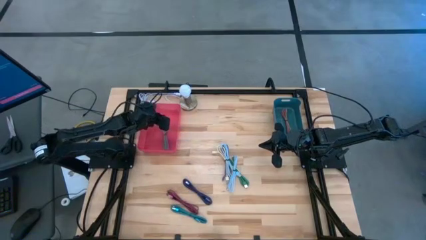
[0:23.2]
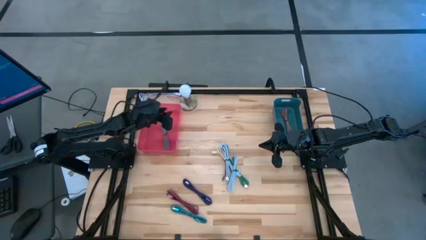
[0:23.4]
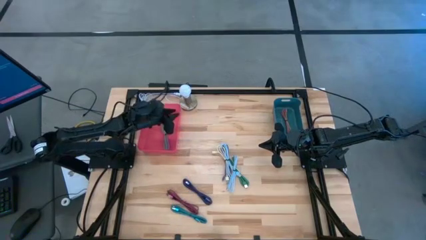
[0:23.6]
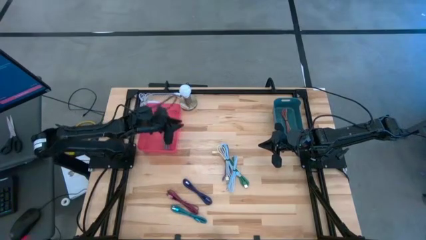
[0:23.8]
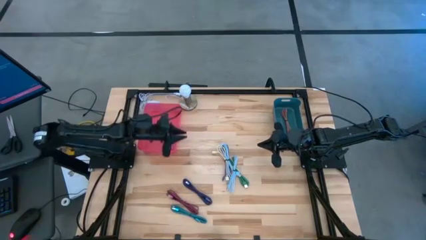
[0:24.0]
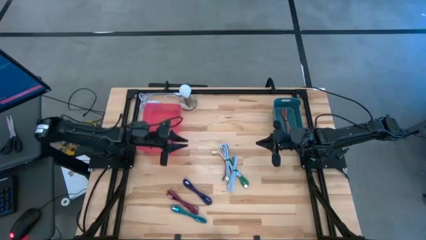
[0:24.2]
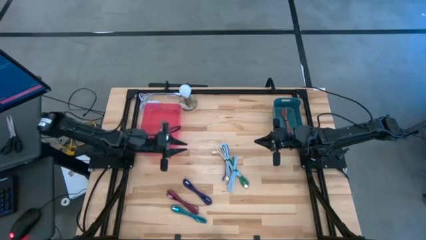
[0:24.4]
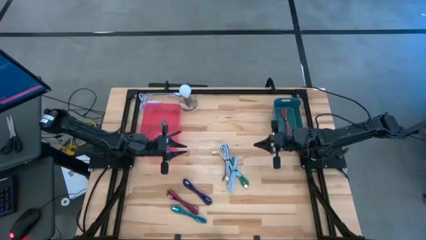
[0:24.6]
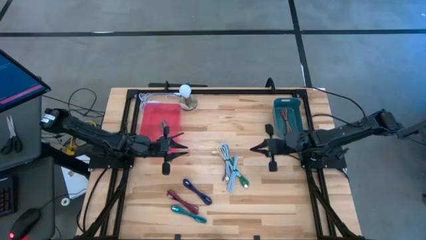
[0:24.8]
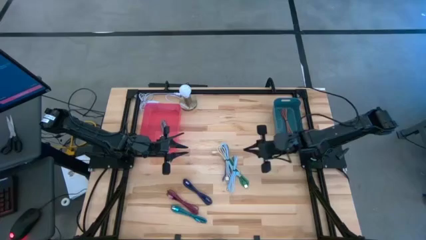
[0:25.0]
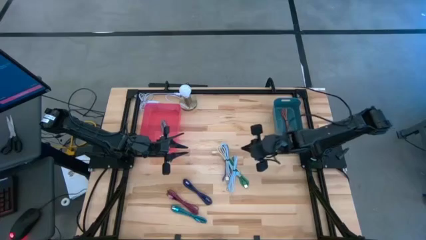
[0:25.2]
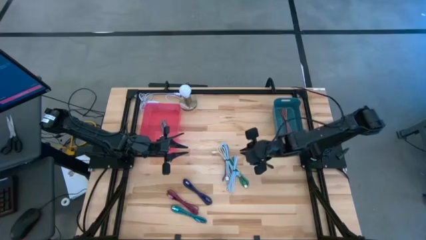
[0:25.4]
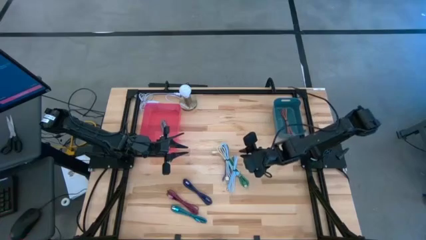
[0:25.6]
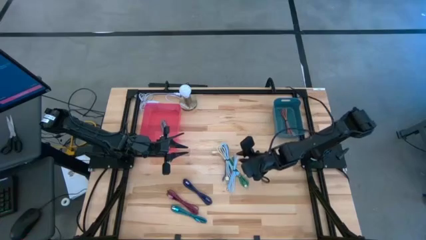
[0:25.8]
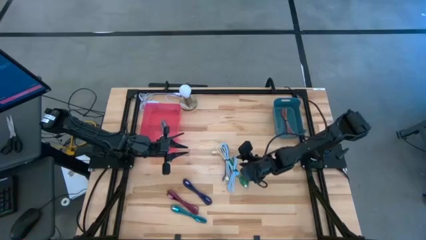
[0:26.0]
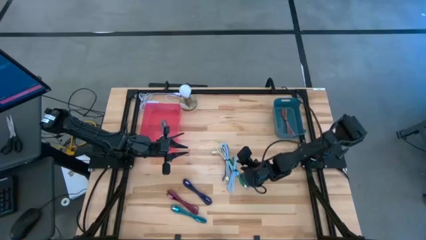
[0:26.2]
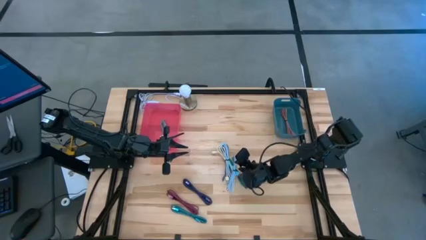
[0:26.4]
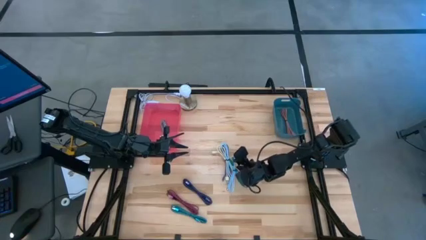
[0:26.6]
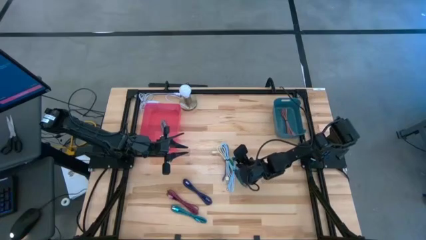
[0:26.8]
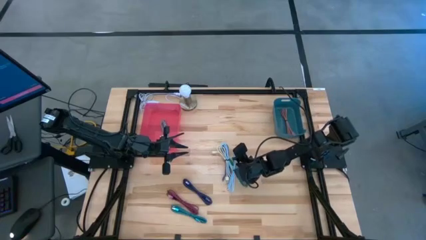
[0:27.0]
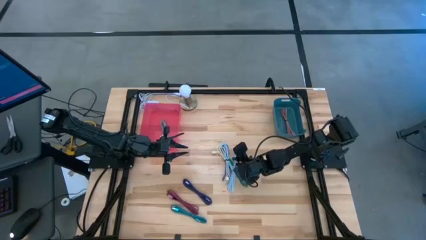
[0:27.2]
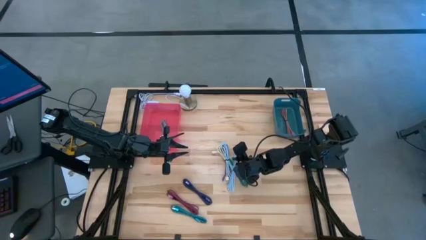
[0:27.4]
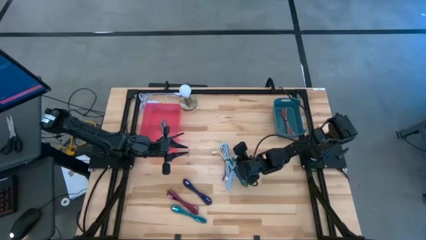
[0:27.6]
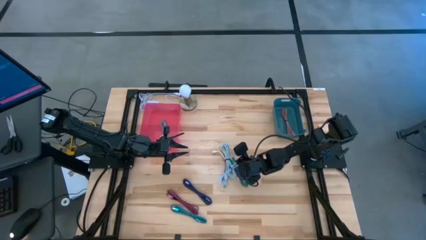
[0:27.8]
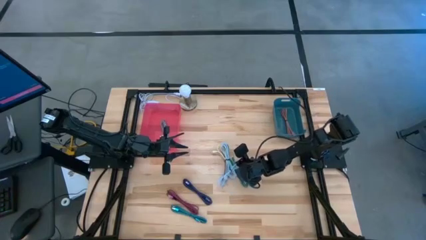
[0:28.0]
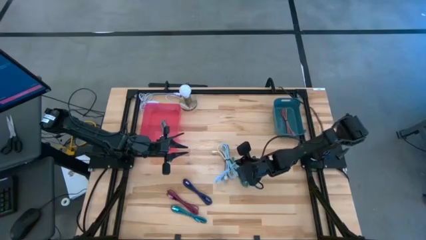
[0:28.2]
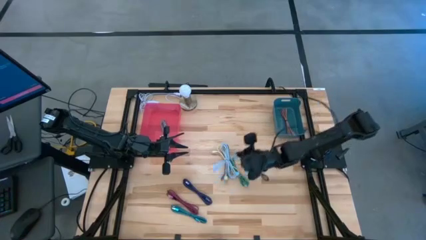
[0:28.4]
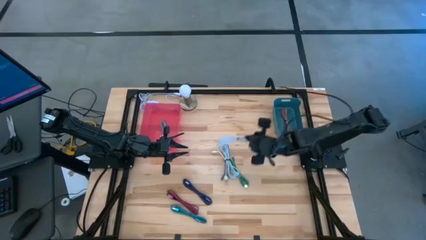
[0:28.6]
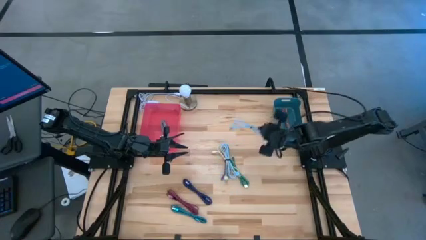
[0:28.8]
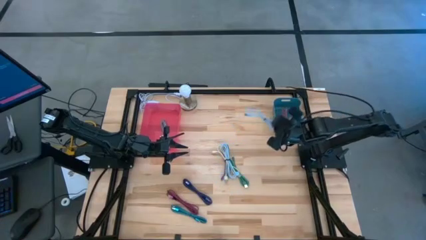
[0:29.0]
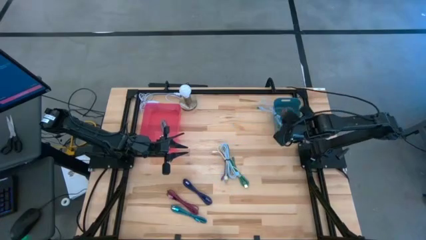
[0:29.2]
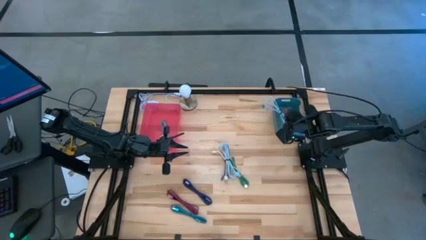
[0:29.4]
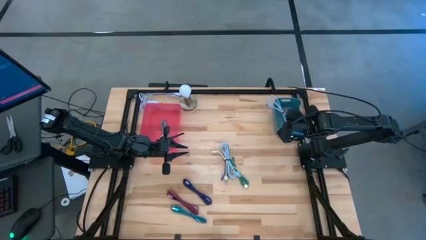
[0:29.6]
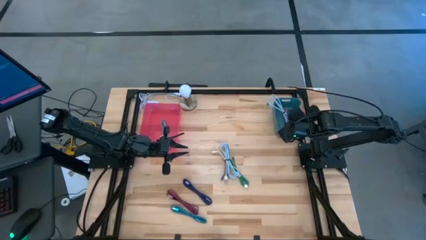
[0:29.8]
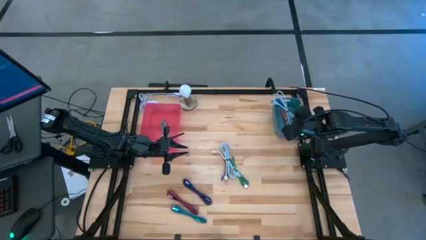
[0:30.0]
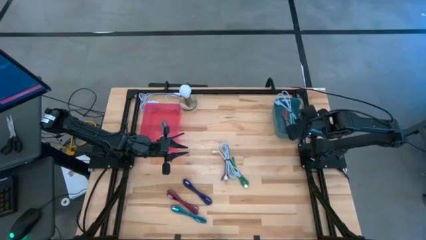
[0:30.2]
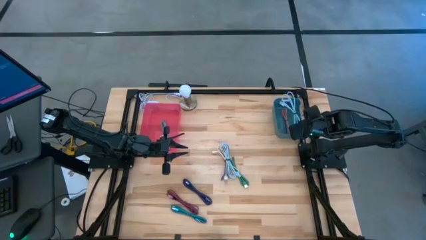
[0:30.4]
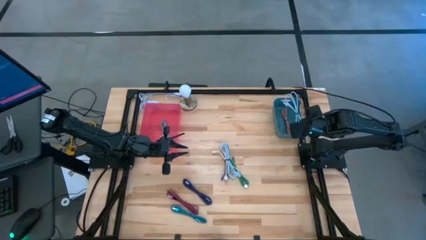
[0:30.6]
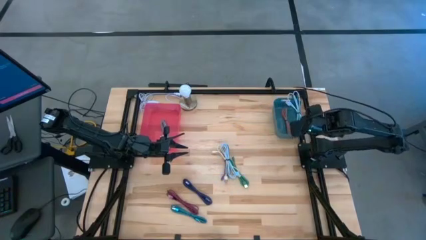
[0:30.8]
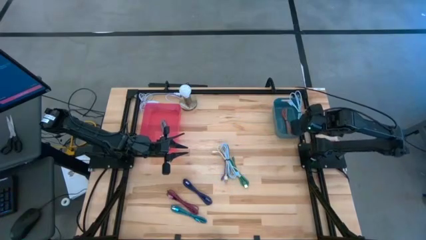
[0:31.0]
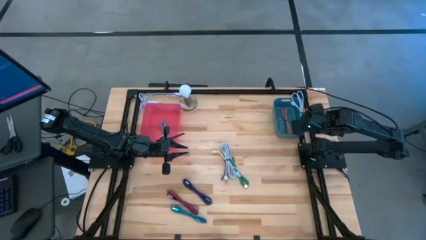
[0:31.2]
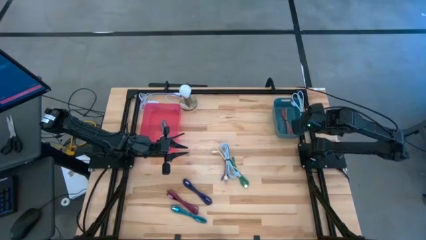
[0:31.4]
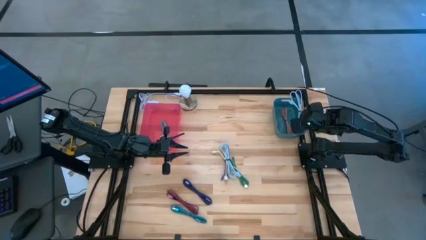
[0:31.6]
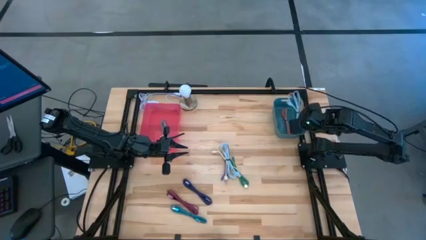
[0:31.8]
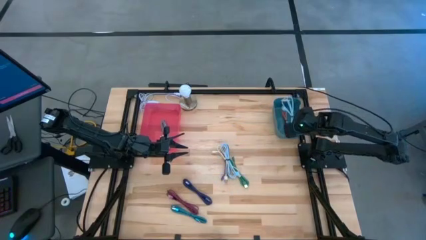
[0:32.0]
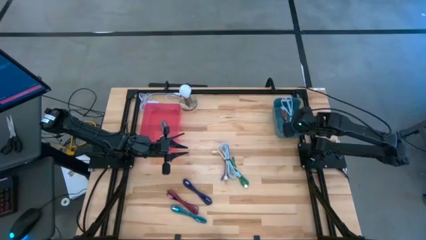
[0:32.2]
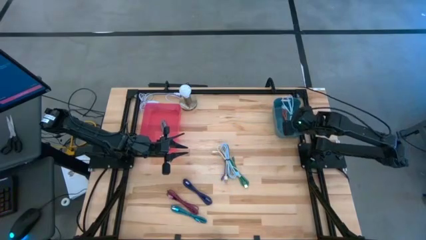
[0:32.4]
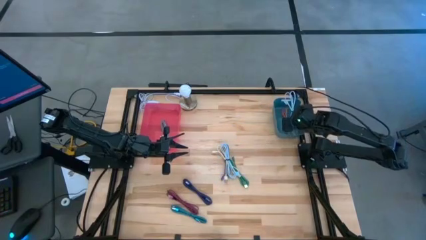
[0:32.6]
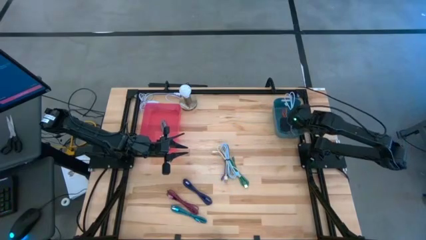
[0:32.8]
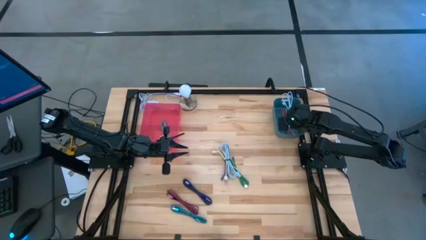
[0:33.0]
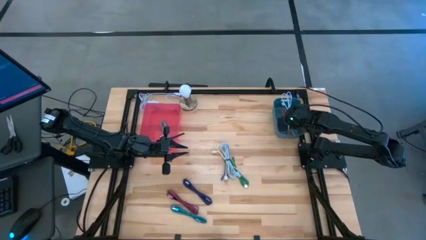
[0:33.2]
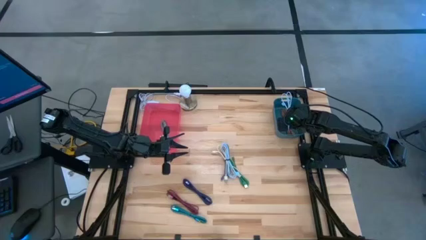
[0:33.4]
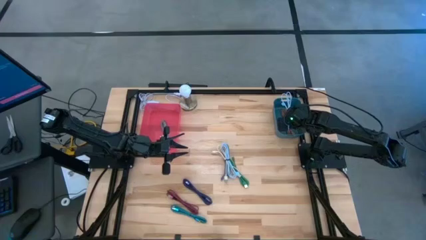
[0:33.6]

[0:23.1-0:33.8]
Task: Pick & Place USB Port
Put the right light blue charger cable into the blue bin

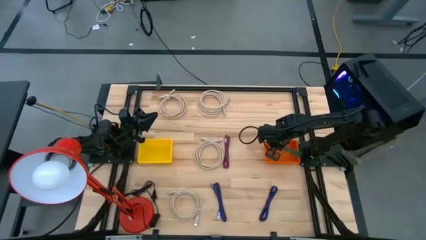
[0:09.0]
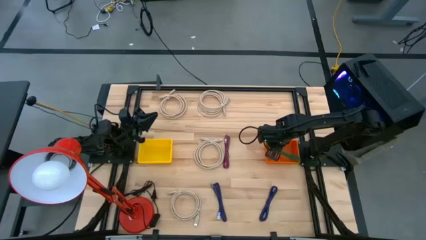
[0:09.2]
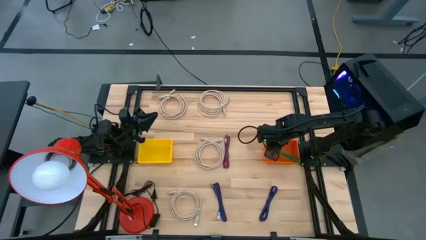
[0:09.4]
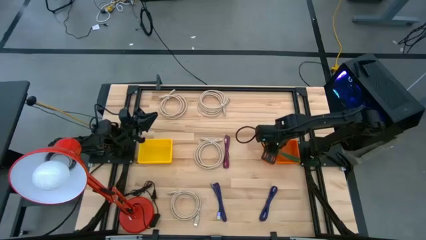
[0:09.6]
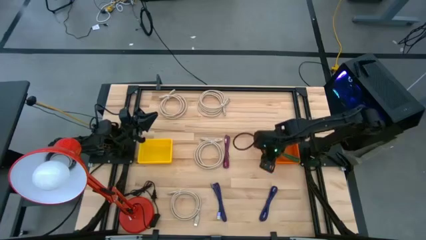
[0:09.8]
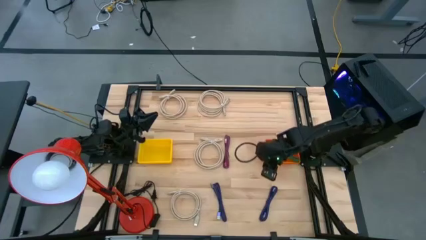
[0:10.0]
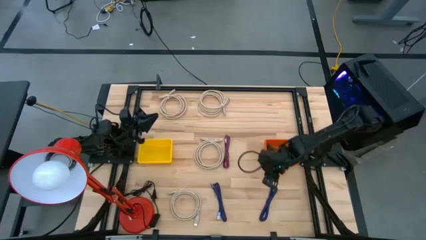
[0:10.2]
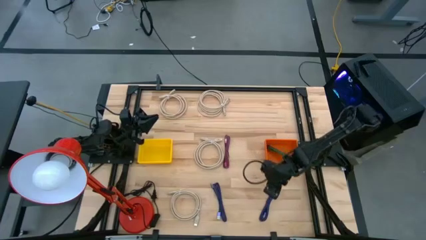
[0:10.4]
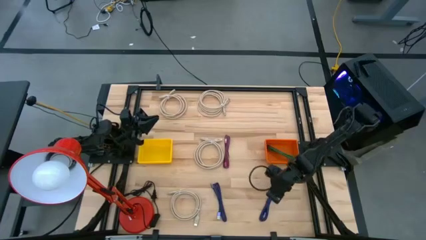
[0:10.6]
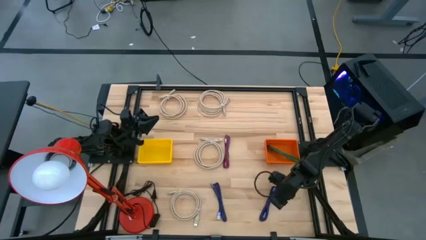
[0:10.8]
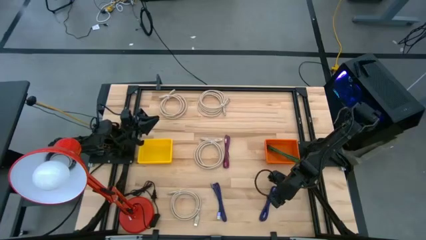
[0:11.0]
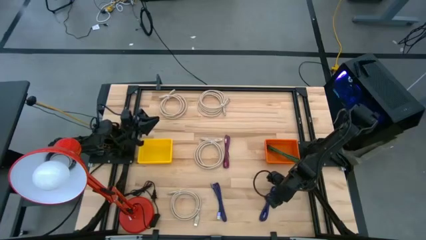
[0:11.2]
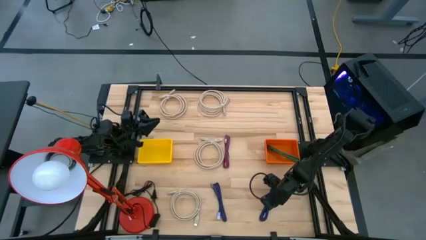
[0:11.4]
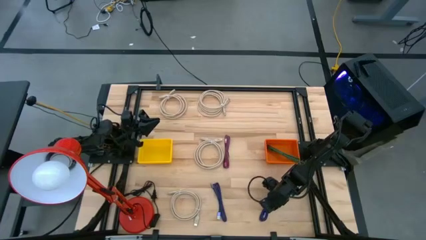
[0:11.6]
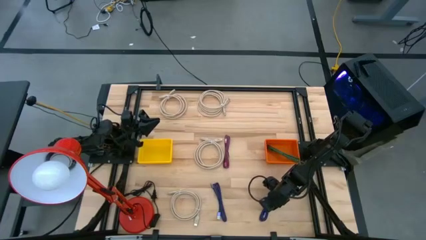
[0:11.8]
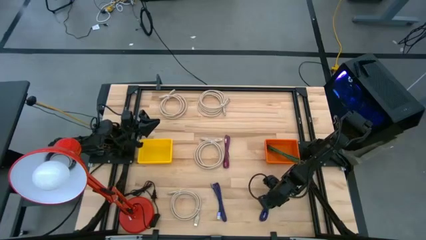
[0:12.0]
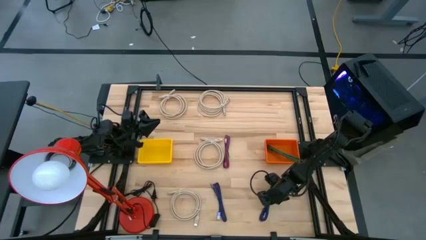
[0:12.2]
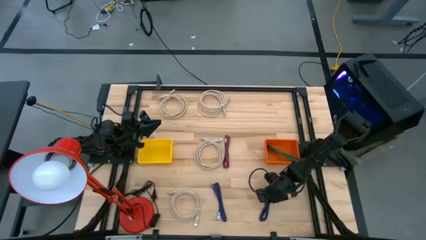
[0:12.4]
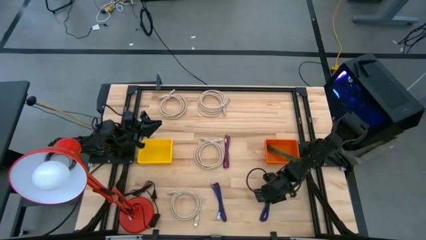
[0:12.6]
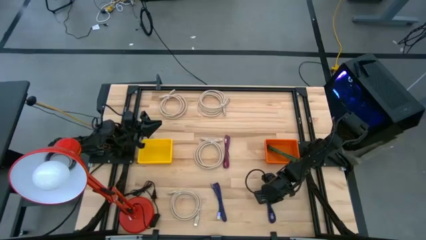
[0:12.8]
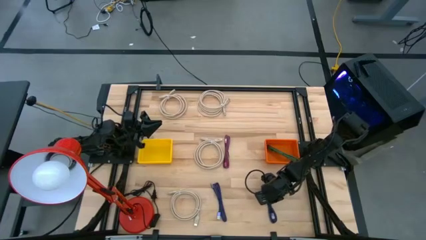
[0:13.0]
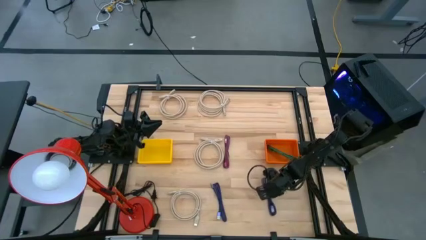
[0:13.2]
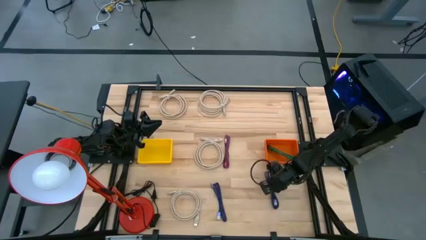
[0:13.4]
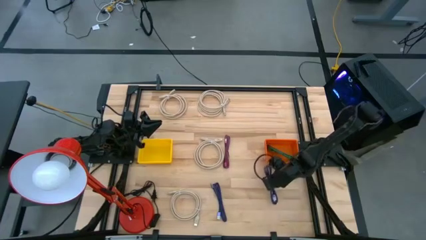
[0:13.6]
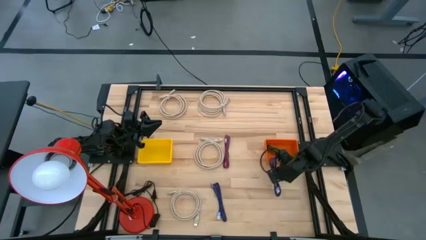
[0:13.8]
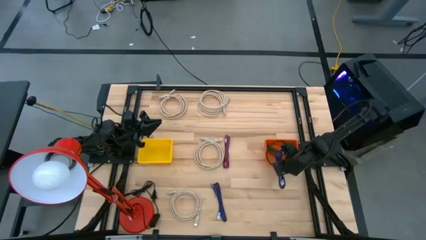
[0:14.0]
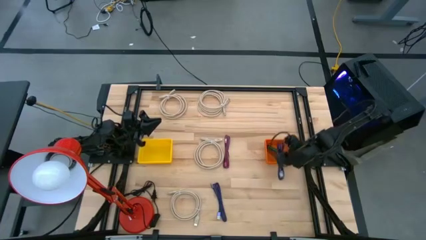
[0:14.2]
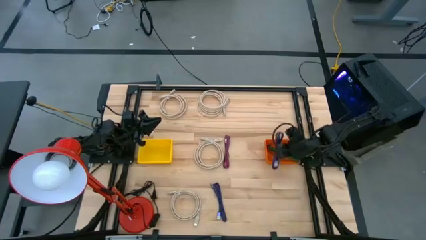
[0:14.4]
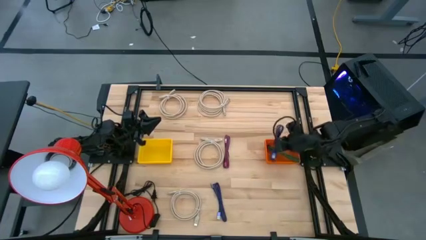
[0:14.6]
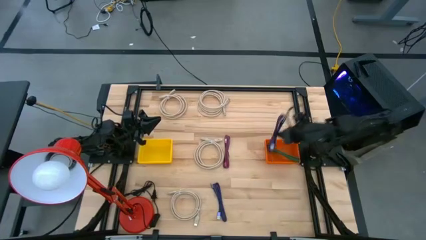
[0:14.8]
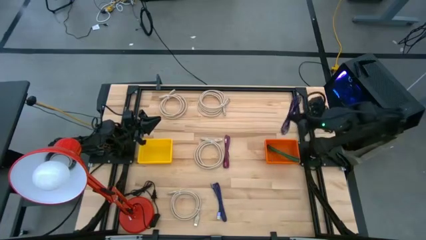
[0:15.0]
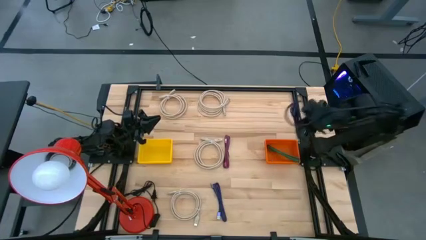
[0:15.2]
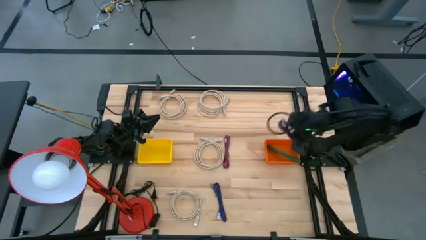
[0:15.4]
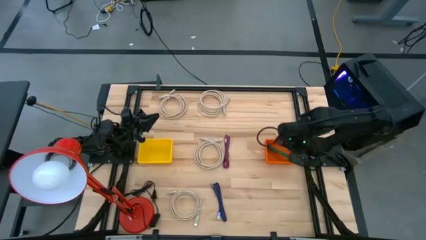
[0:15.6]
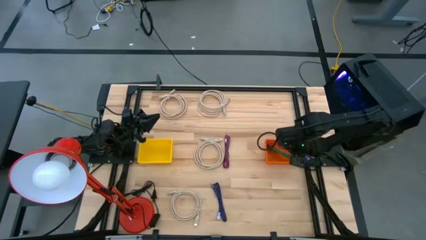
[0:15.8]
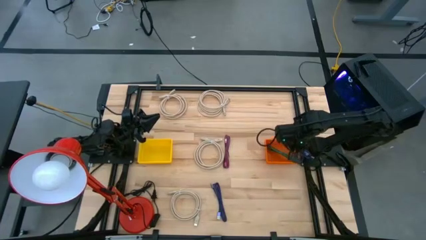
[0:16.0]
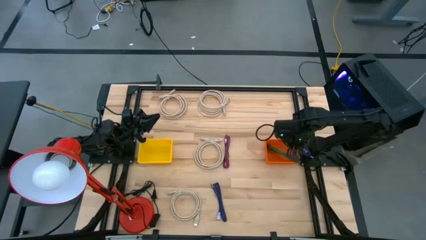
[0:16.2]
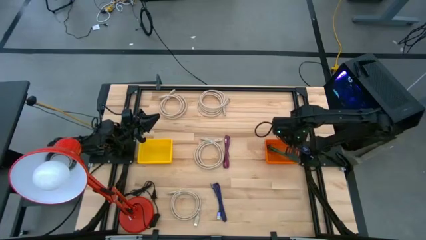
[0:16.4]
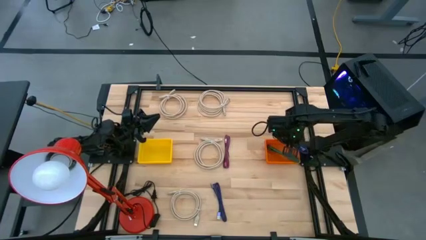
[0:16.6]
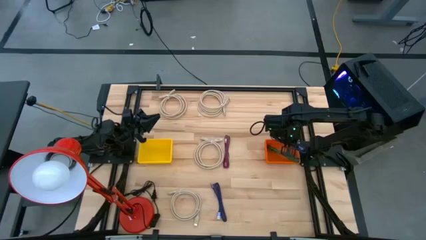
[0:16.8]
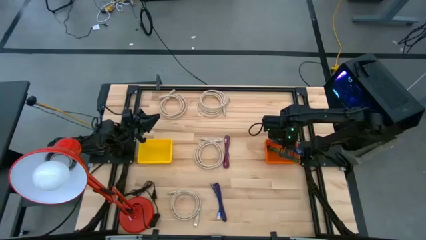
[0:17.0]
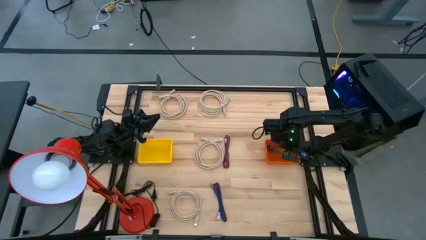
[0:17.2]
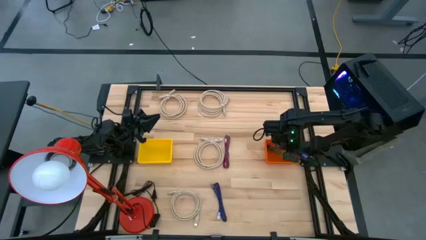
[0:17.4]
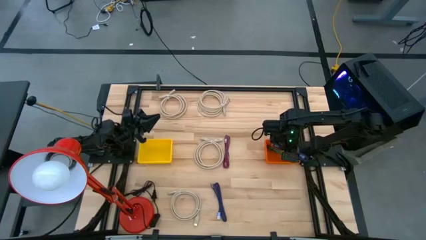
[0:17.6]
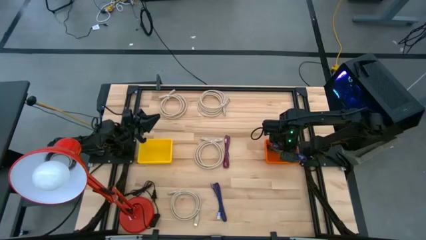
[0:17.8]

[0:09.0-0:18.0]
Task: Pick & Place USB Port
Put the black and blue charger cable into the orange bin
